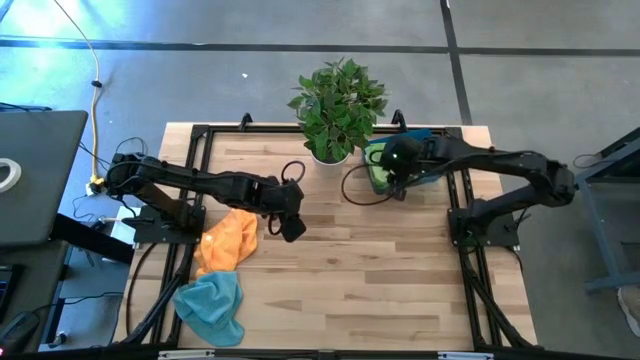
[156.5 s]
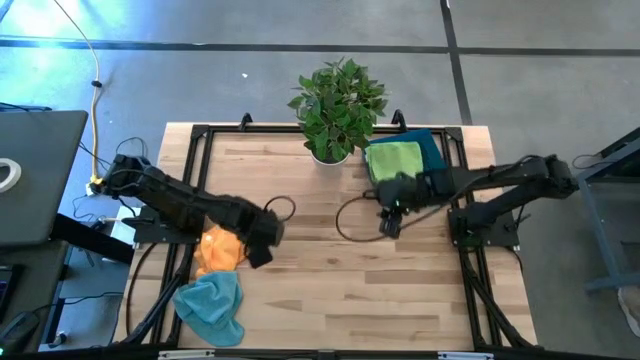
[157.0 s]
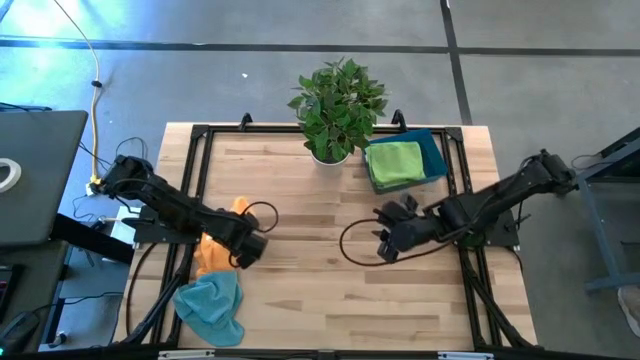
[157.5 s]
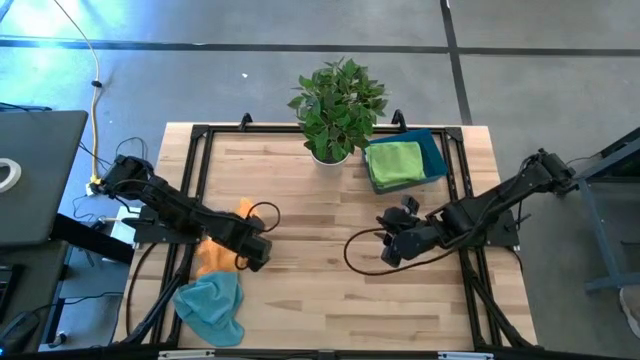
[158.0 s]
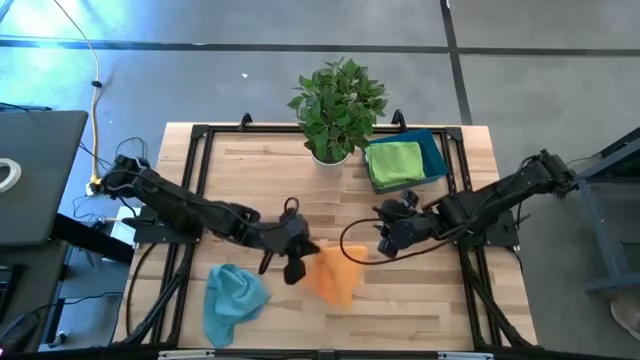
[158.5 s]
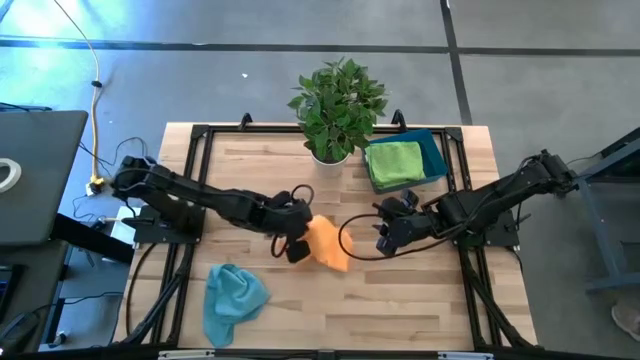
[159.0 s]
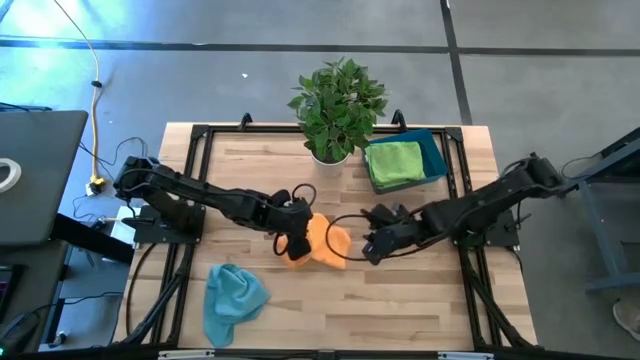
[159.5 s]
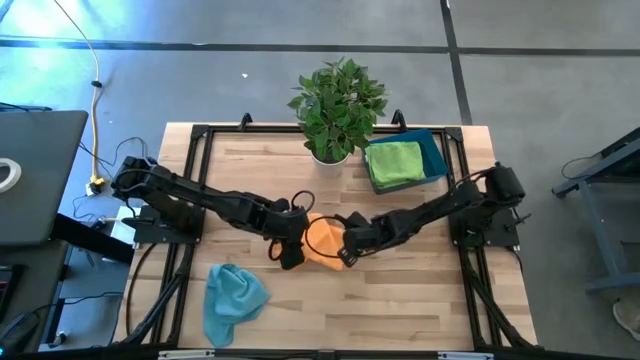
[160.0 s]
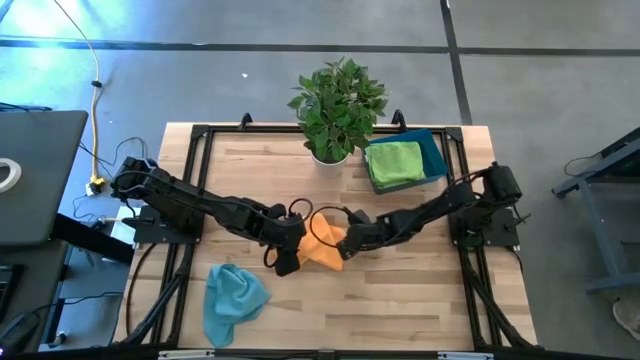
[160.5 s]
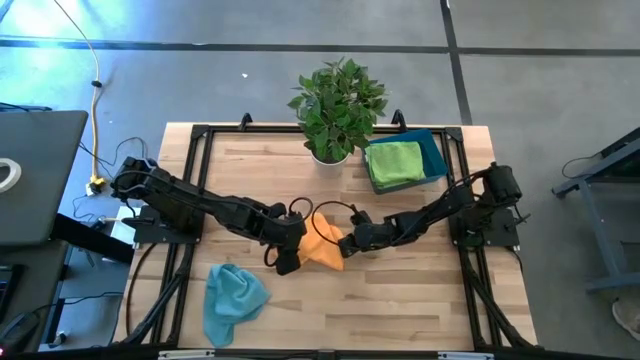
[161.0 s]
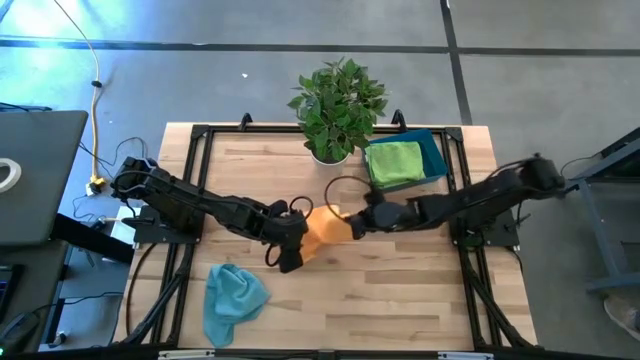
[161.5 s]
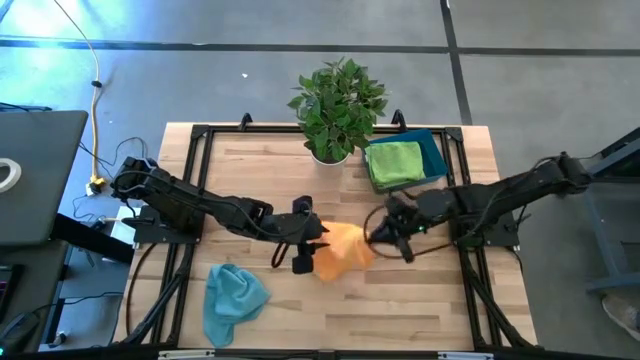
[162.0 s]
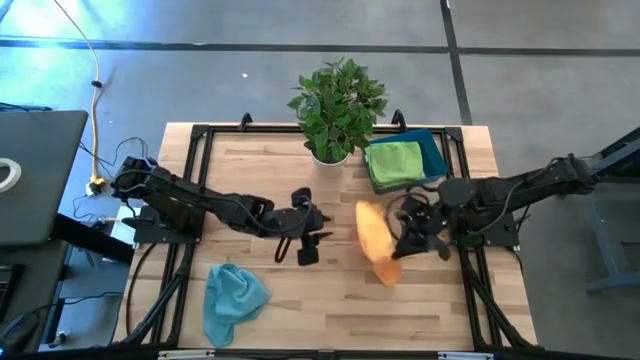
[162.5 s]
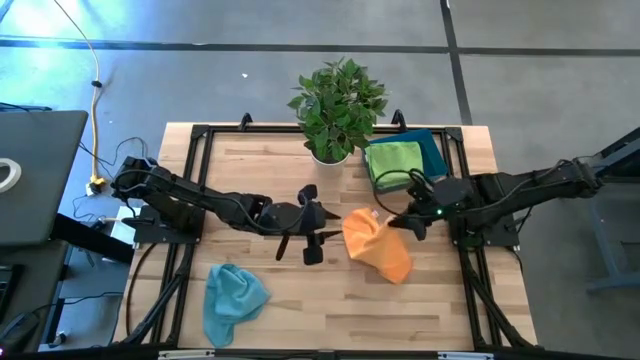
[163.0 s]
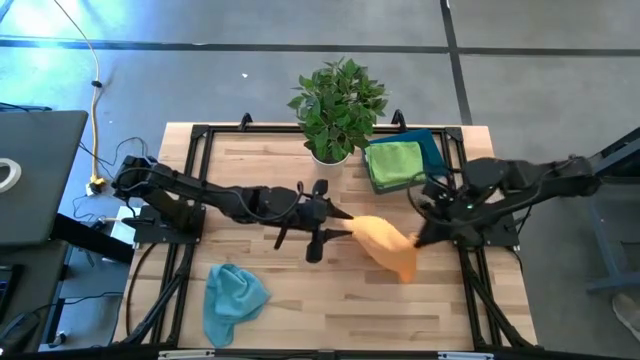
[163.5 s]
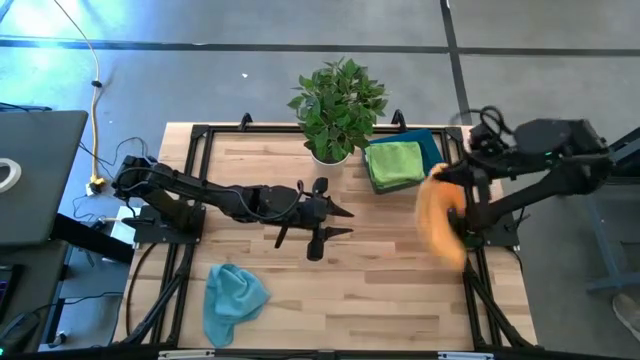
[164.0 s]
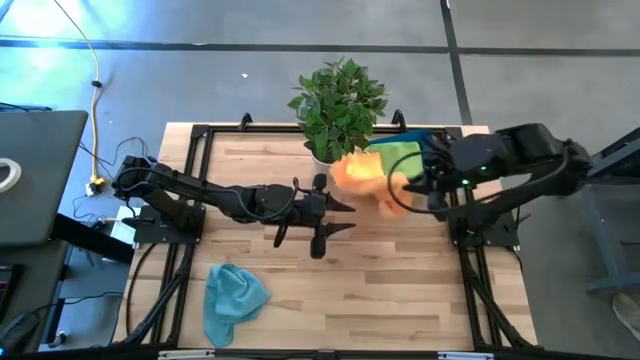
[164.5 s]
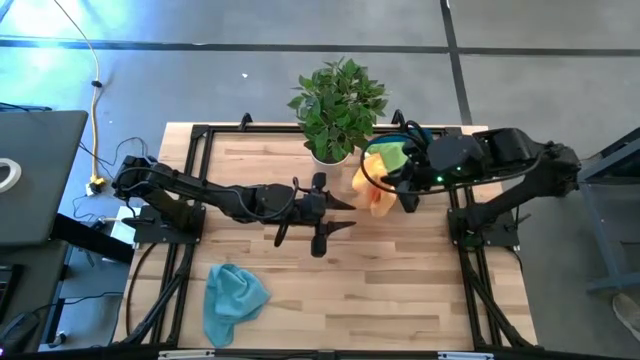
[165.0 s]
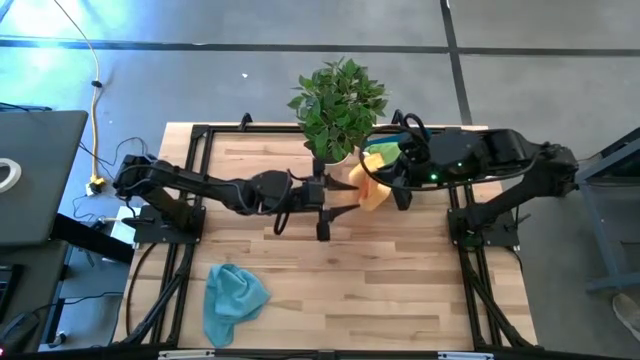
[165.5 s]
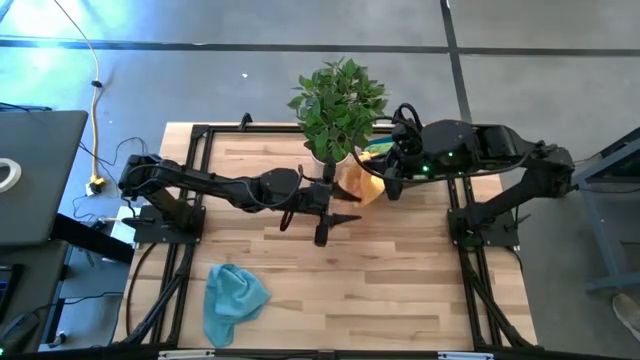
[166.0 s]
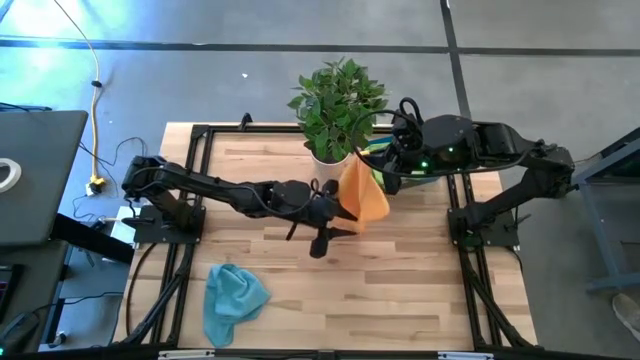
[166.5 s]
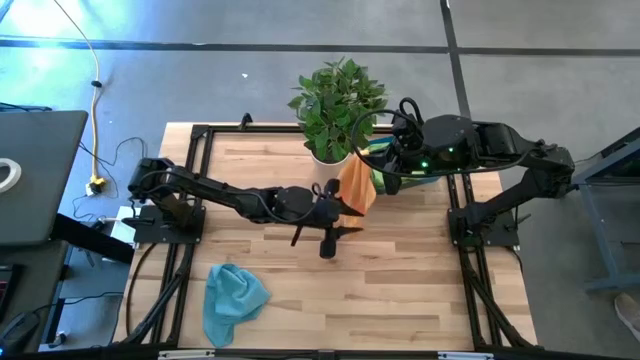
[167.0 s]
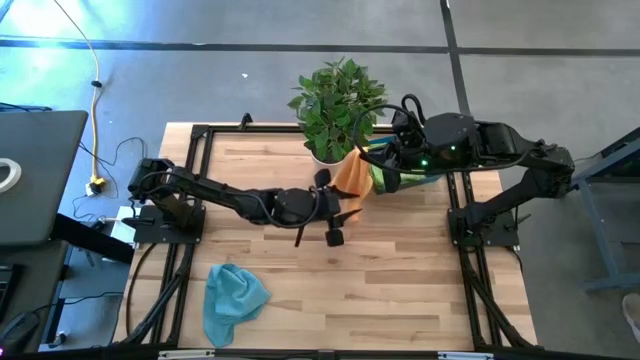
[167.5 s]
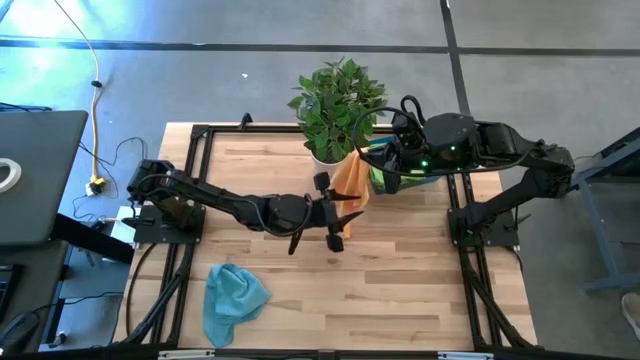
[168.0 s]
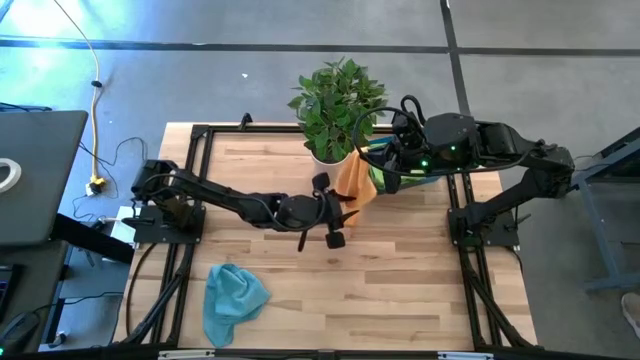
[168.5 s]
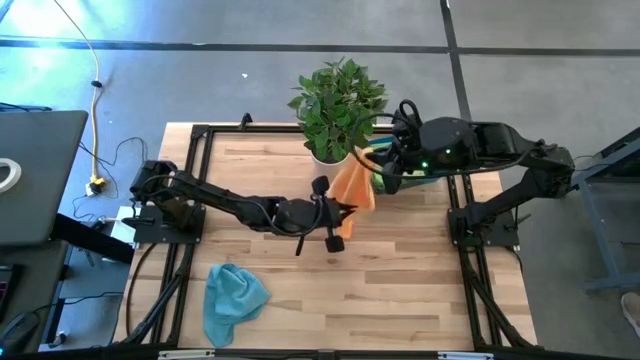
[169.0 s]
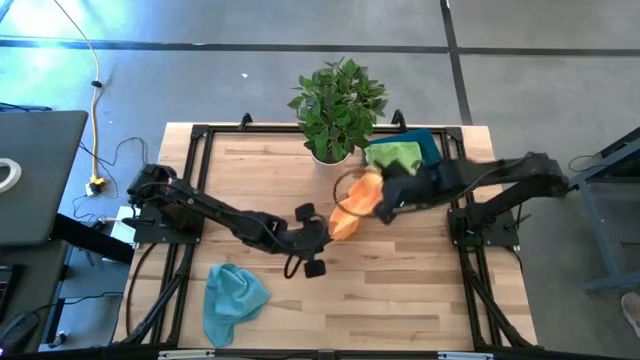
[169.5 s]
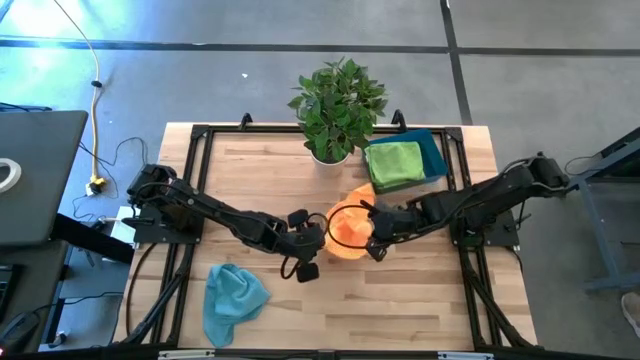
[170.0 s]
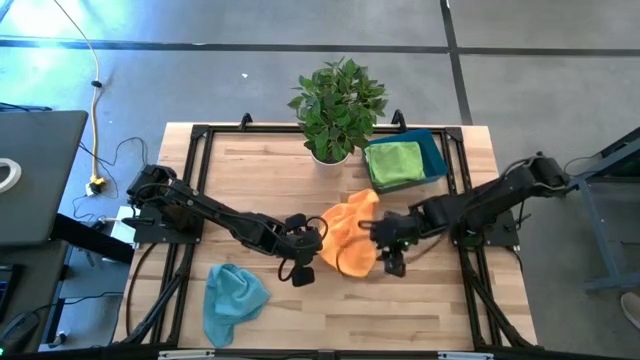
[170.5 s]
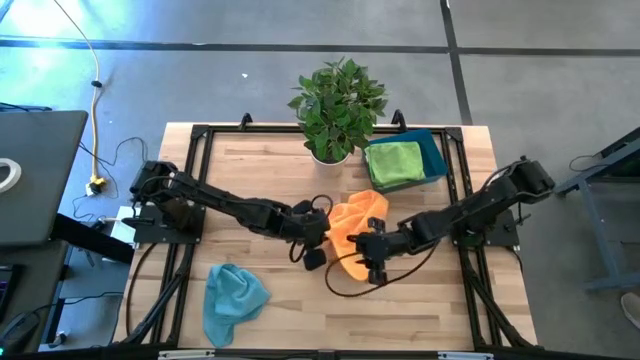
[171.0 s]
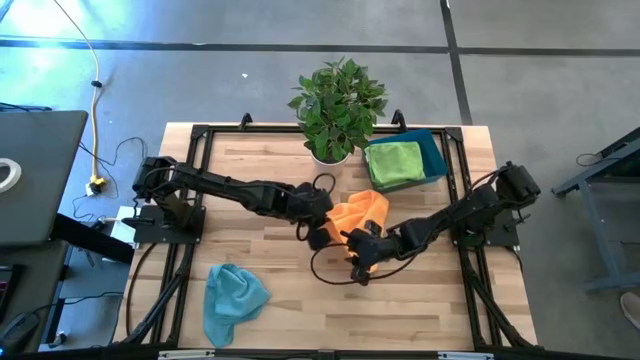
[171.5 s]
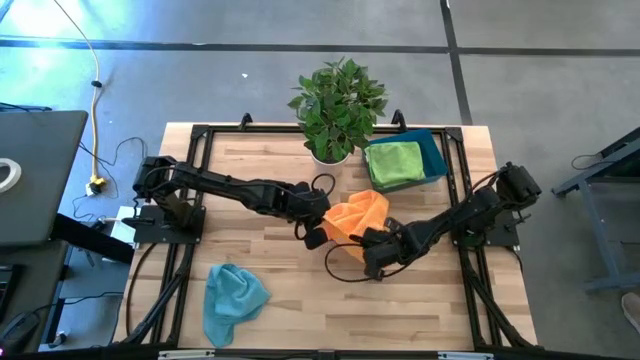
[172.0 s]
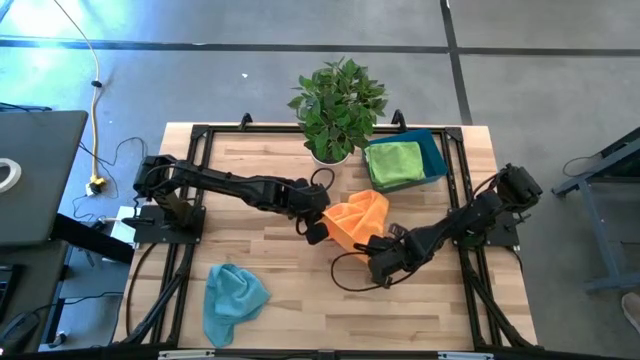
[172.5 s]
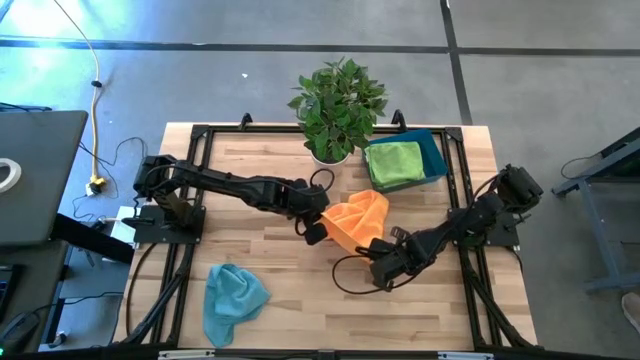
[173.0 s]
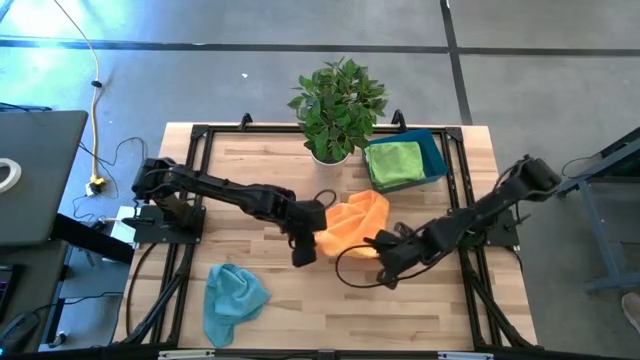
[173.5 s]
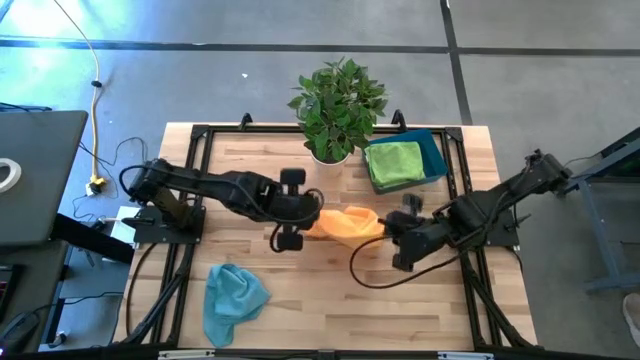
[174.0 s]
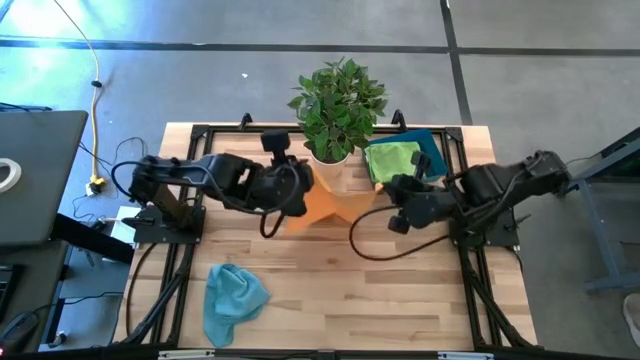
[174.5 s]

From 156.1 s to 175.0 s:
Task: Sort microfiber towel by color & place in baskets
Fold the orange towel

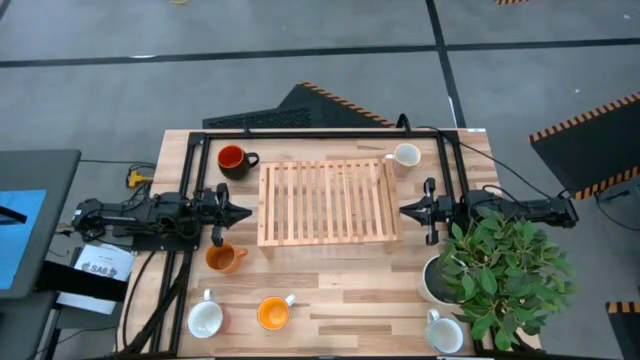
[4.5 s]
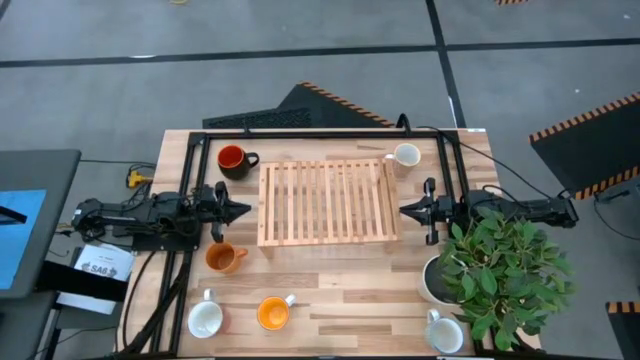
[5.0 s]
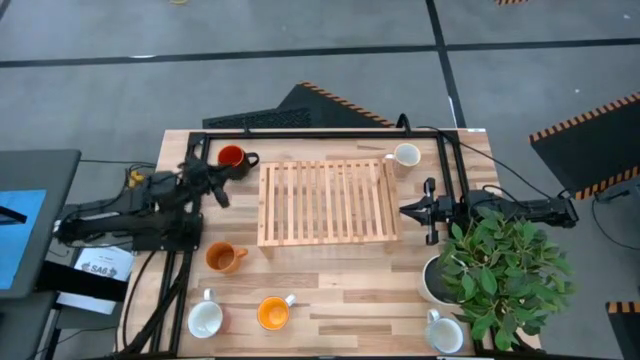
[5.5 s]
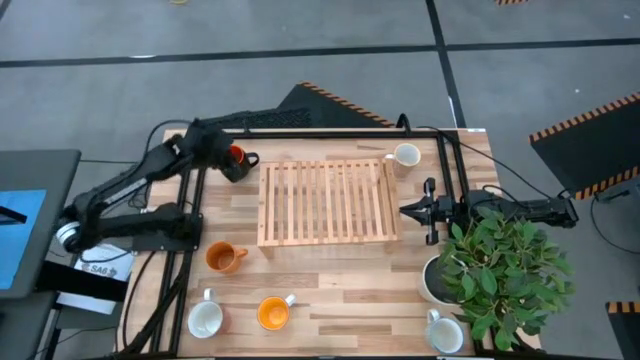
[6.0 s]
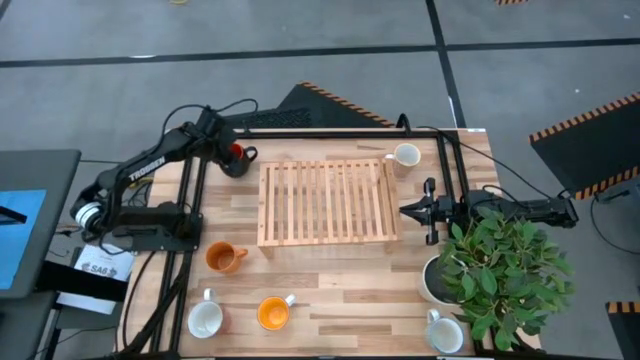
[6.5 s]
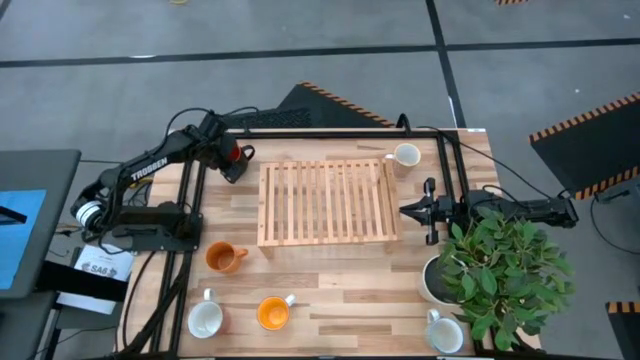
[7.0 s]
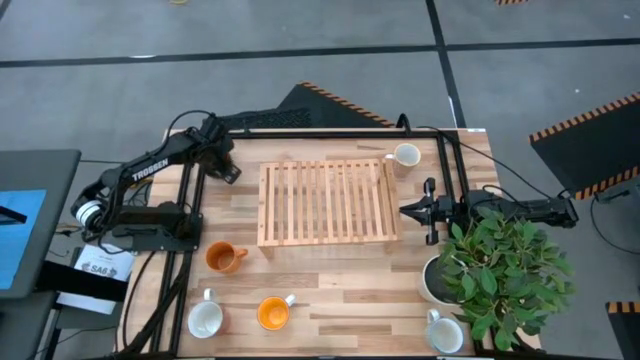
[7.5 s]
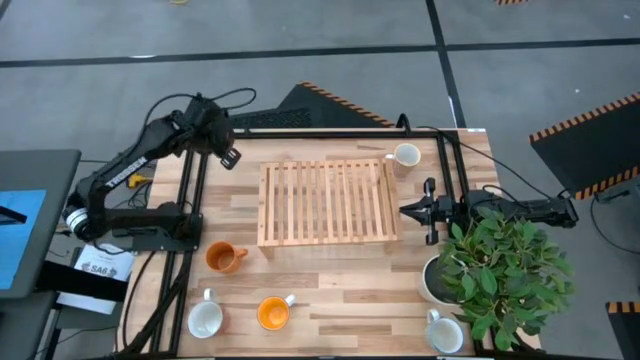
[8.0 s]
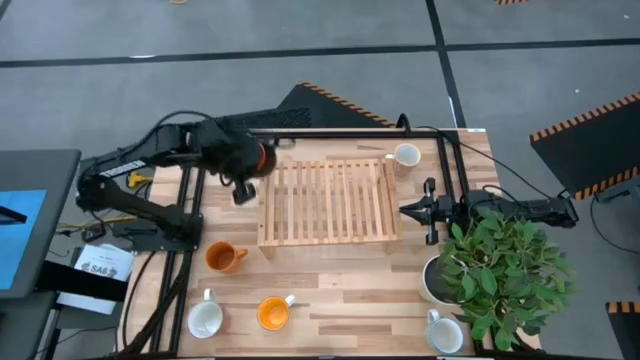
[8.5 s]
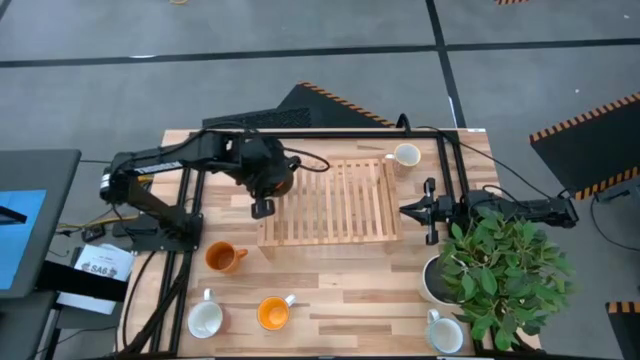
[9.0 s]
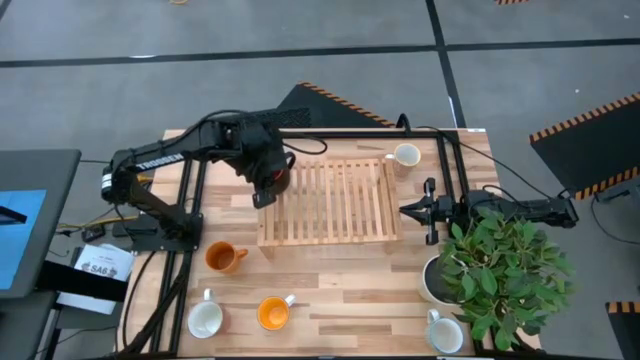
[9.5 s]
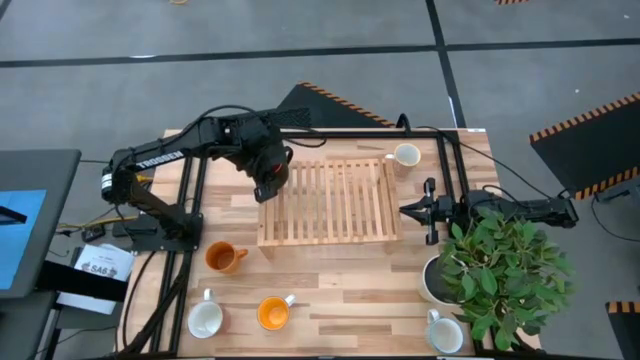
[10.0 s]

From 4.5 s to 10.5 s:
Task: Place coffee mugs
Put the black mug on the shelf
